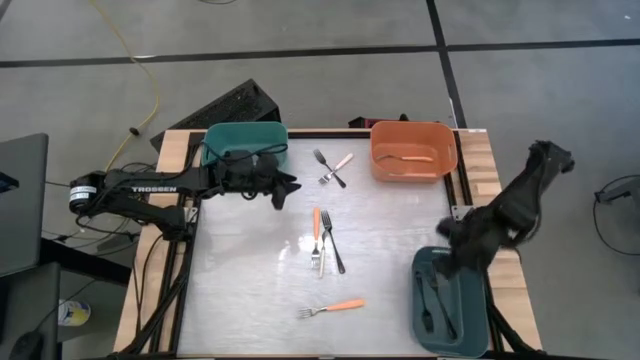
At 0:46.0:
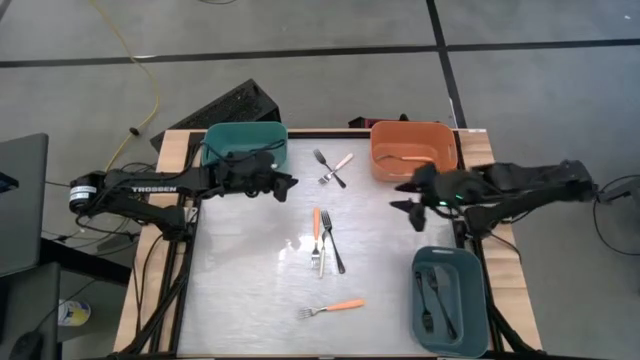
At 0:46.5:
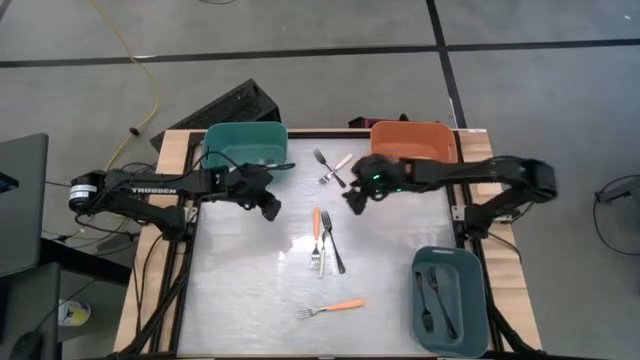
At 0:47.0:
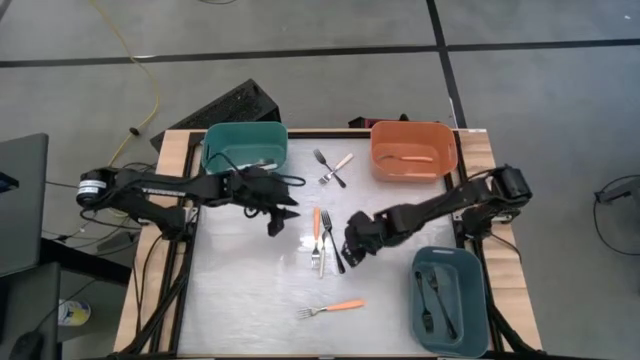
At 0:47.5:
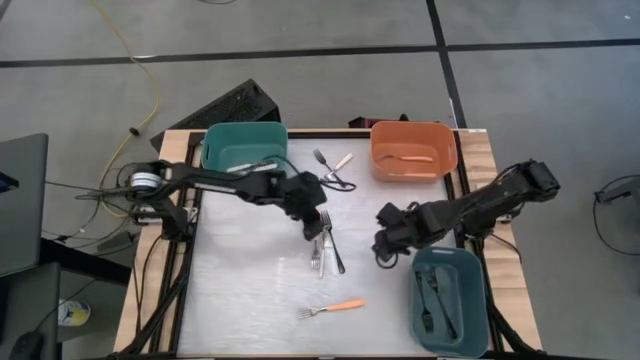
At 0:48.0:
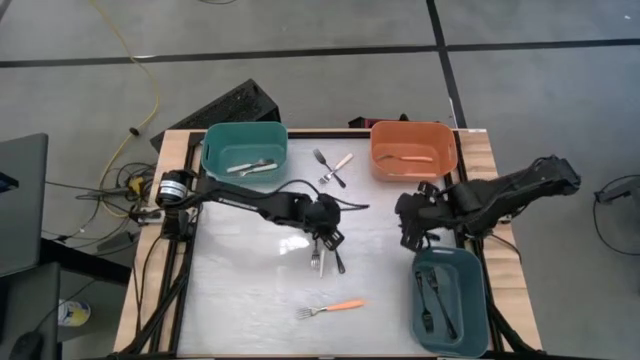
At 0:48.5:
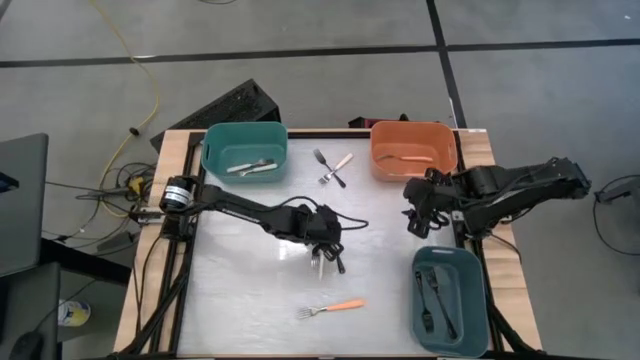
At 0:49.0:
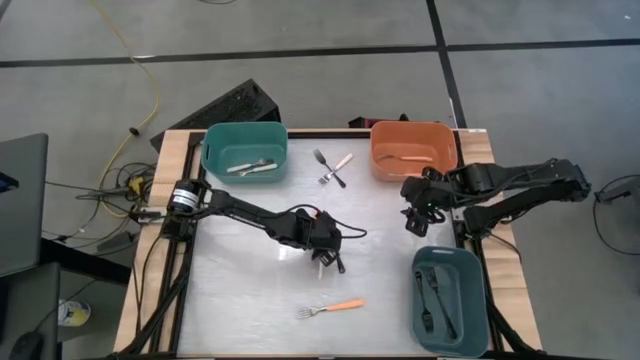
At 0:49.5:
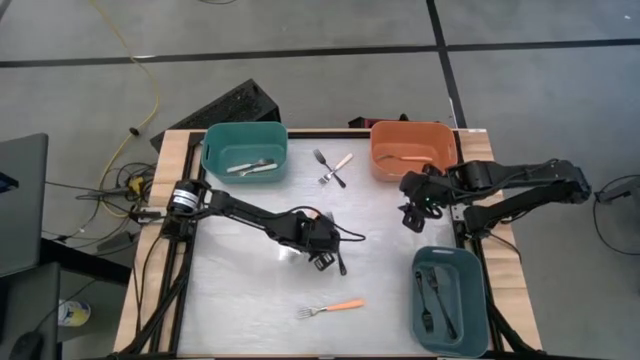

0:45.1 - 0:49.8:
Task: Sort silverware by color (type)
Put the bottom white fork into the green bin

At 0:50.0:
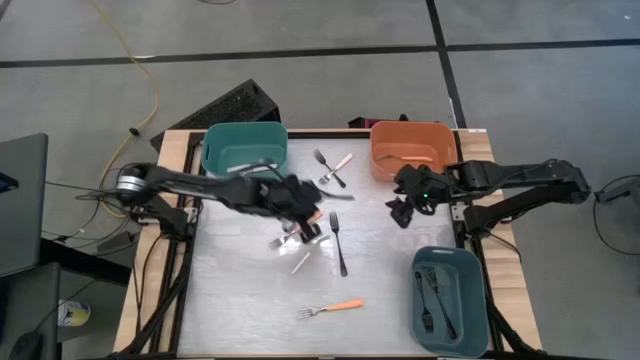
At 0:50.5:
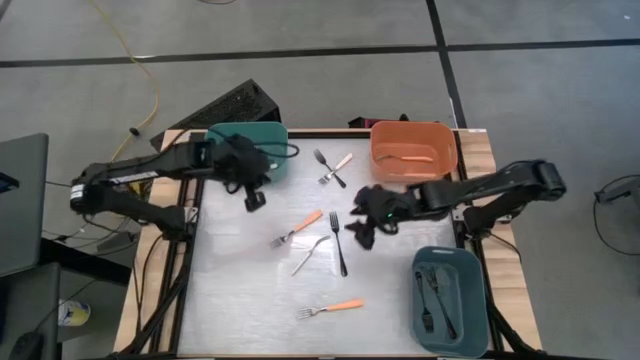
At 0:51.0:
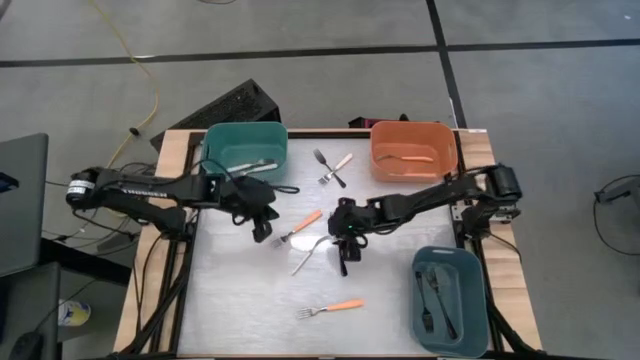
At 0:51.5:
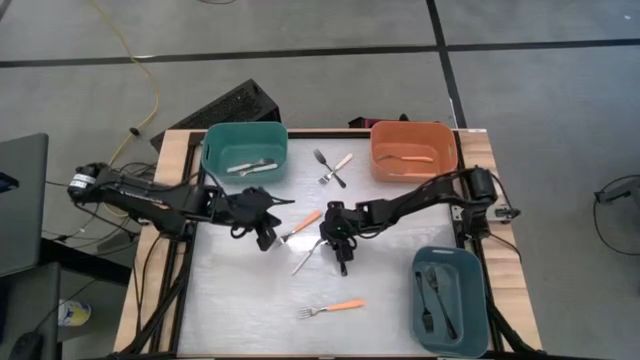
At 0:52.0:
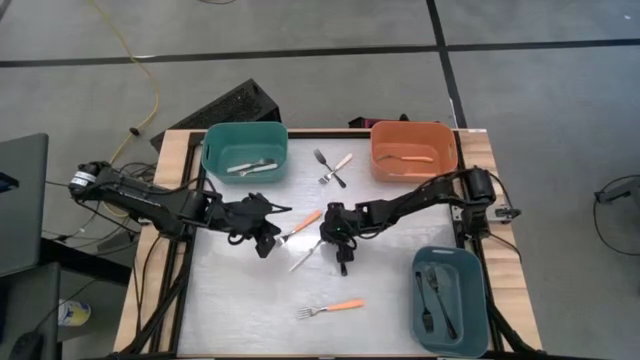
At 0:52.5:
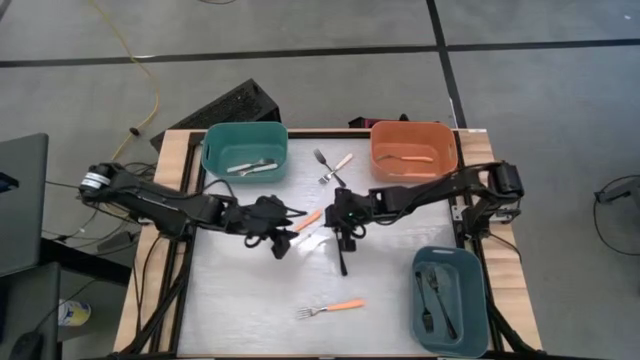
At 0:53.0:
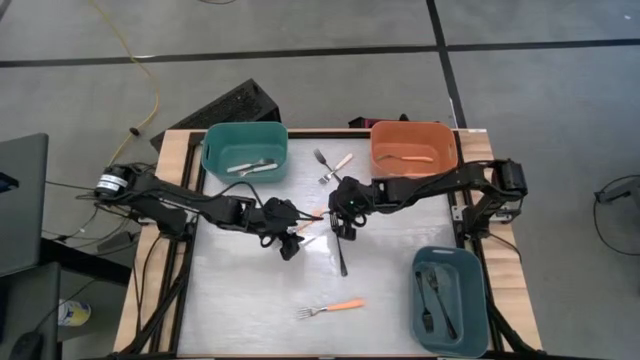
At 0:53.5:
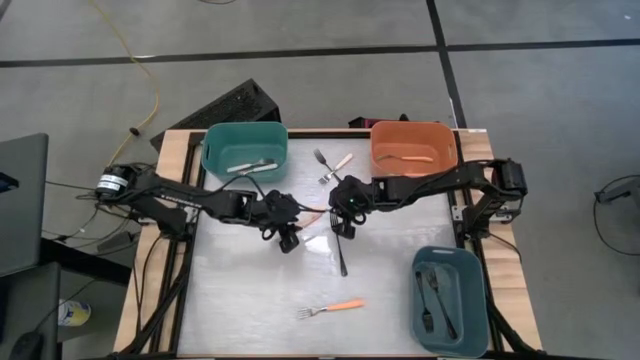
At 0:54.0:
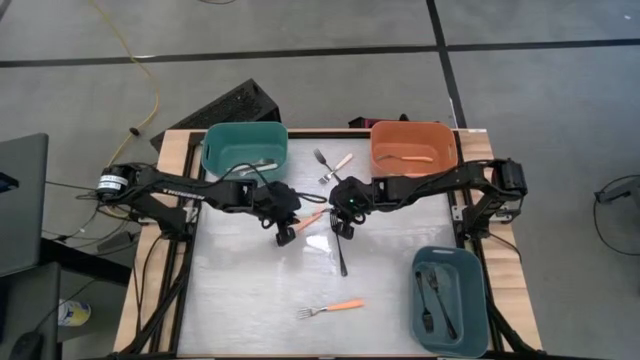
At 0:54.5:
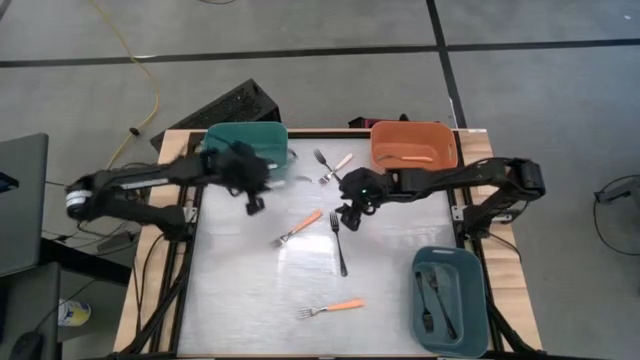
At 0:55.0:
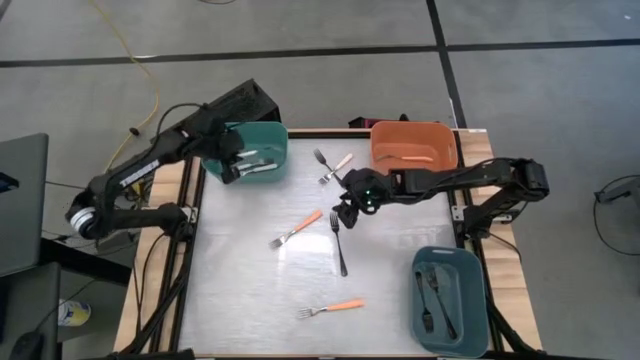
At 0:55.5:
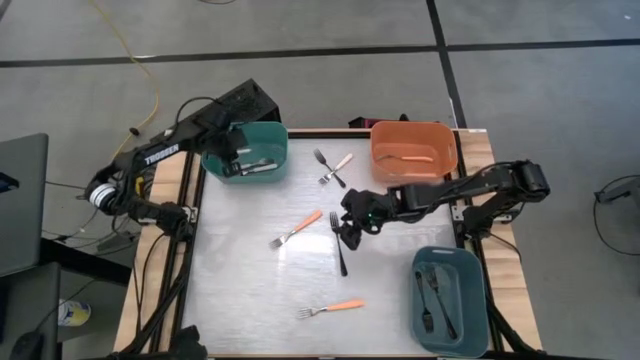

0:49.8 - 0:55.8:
Put the bottom white fork into the green bin

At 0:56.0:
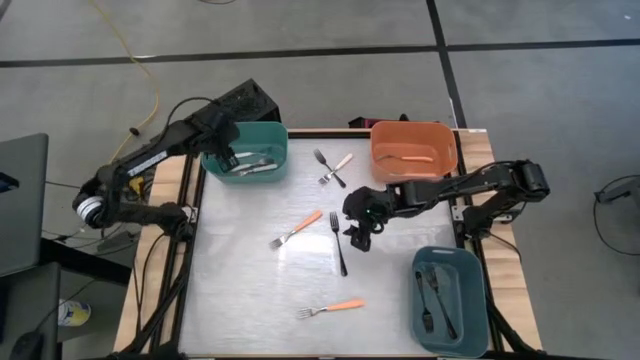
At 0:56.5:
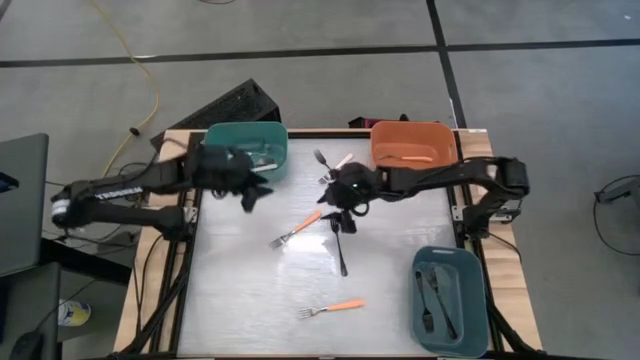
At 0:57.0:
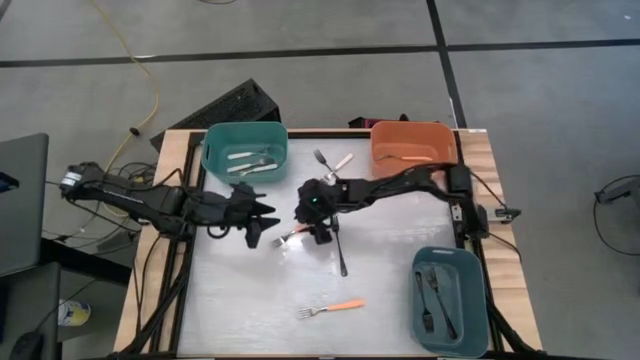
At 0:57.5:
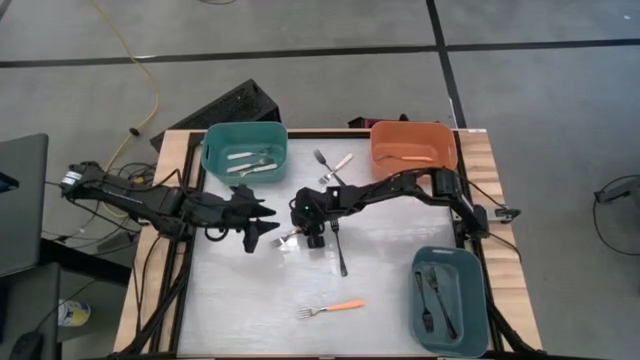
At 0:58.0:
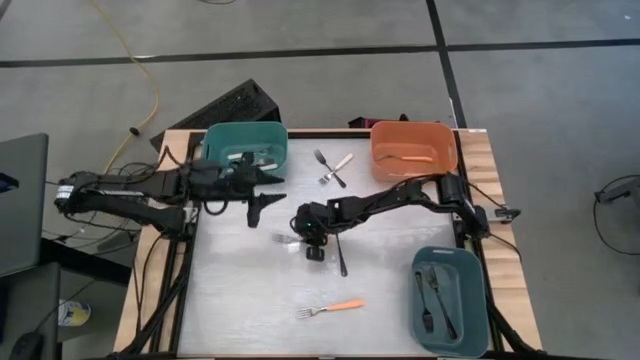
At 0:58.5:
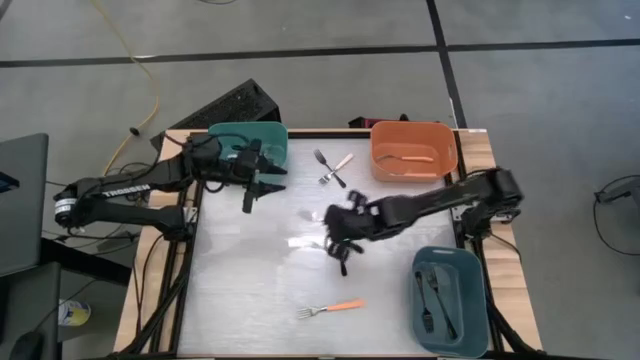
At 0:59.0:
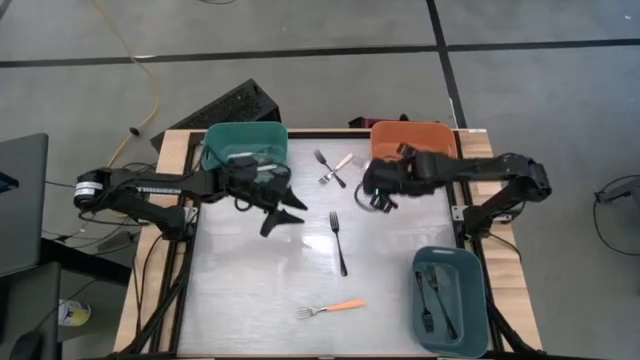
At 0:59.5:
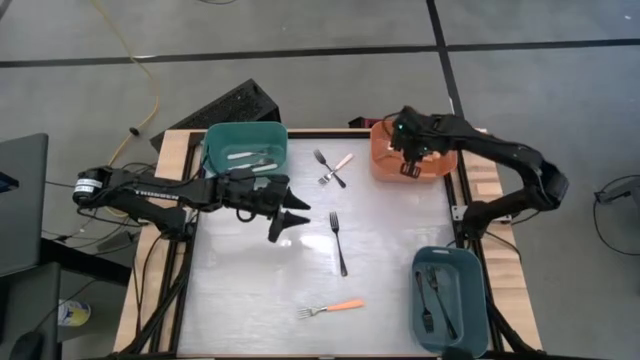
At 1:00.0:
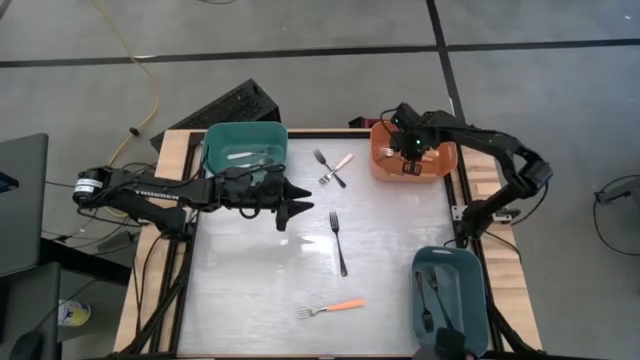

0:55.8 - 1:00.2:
Put the top orange fork into the orange bin

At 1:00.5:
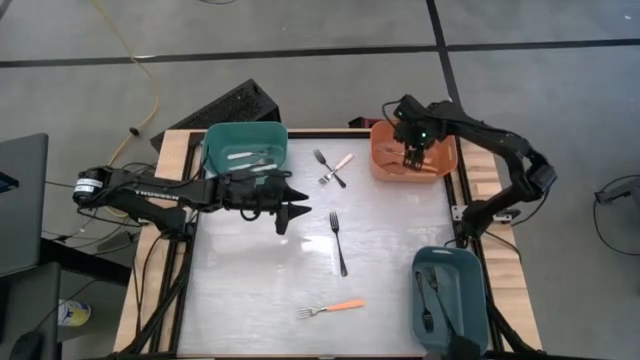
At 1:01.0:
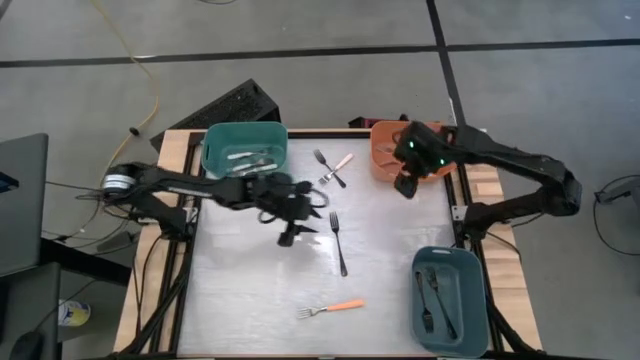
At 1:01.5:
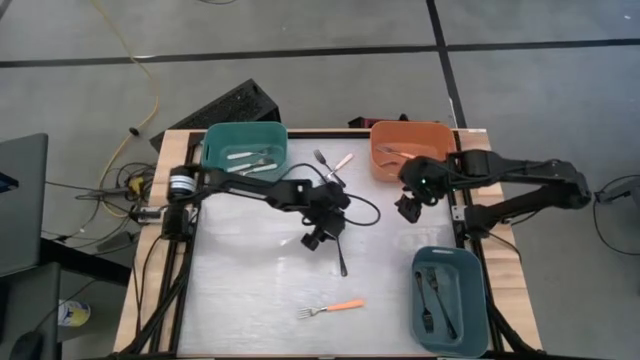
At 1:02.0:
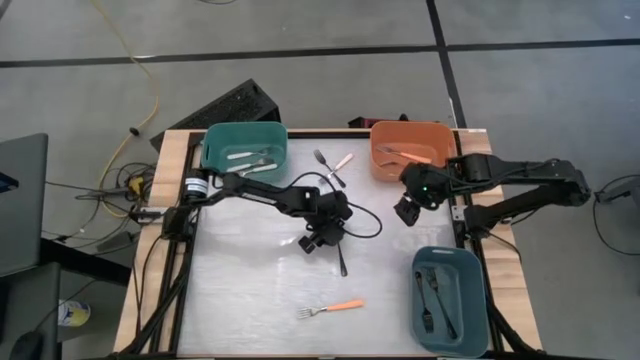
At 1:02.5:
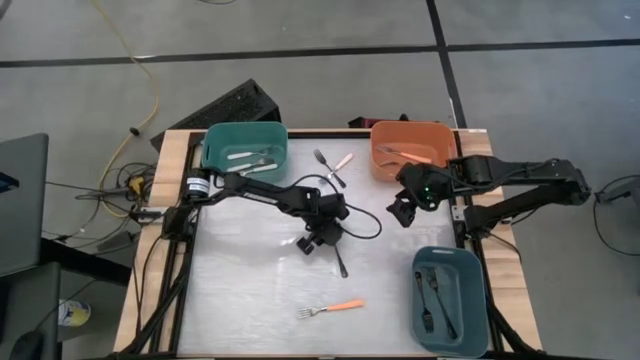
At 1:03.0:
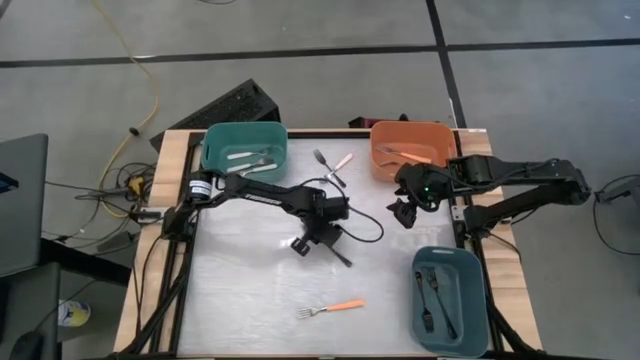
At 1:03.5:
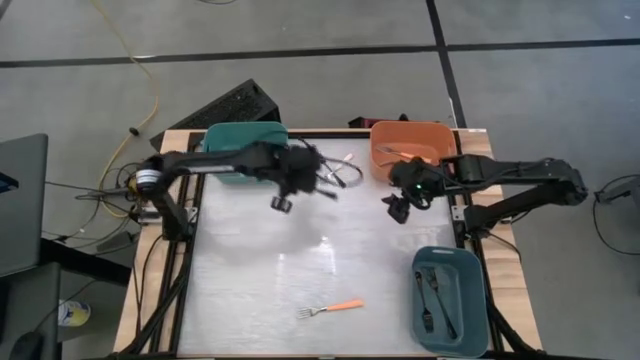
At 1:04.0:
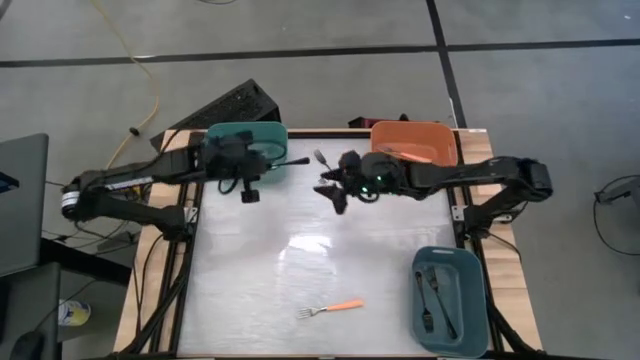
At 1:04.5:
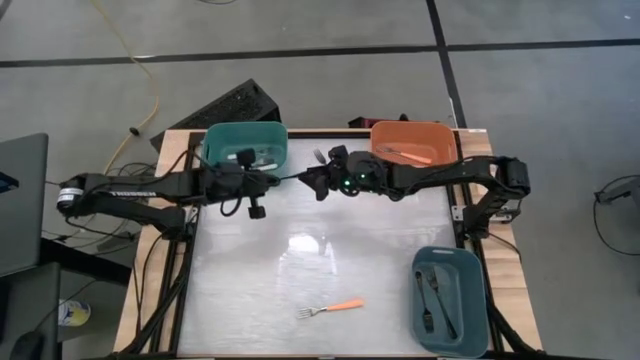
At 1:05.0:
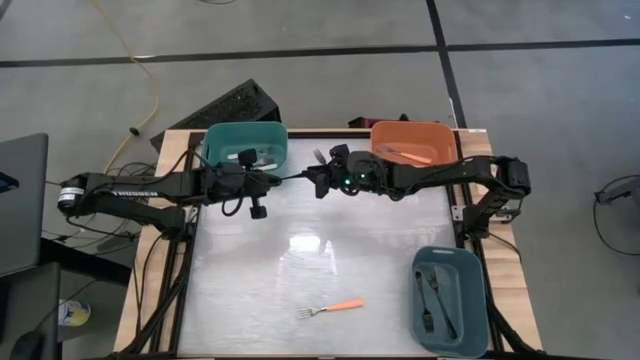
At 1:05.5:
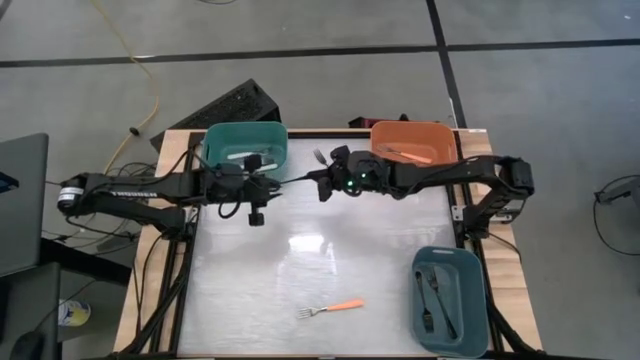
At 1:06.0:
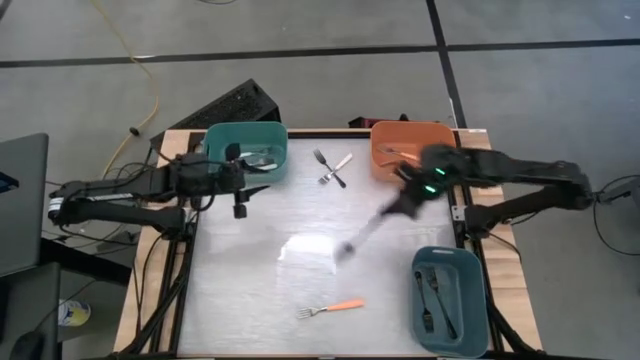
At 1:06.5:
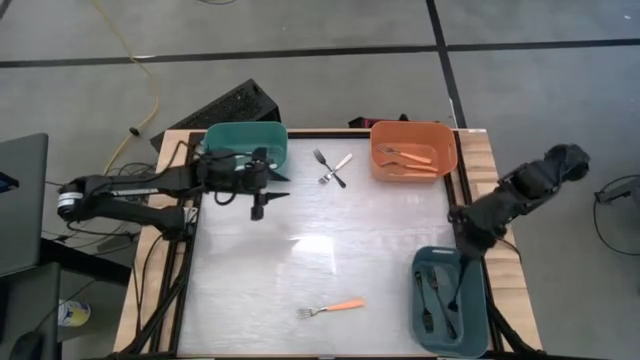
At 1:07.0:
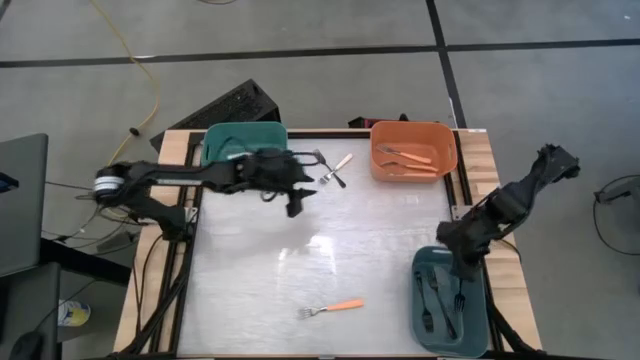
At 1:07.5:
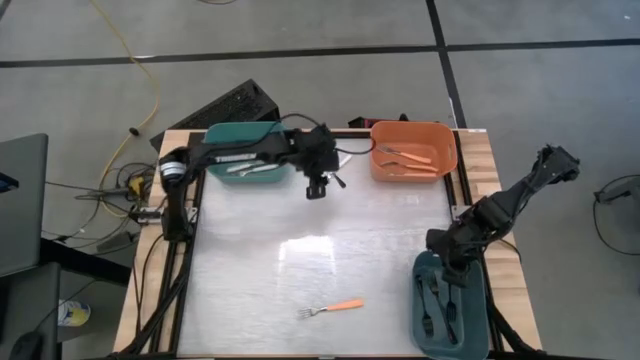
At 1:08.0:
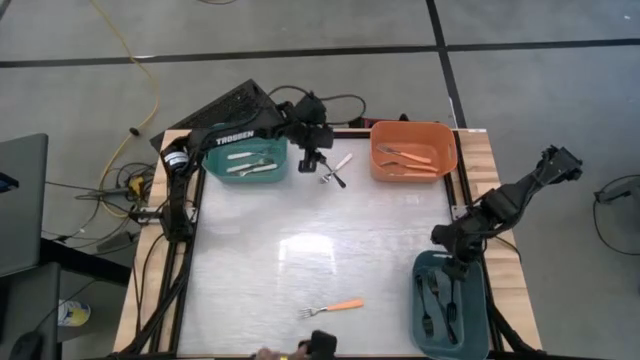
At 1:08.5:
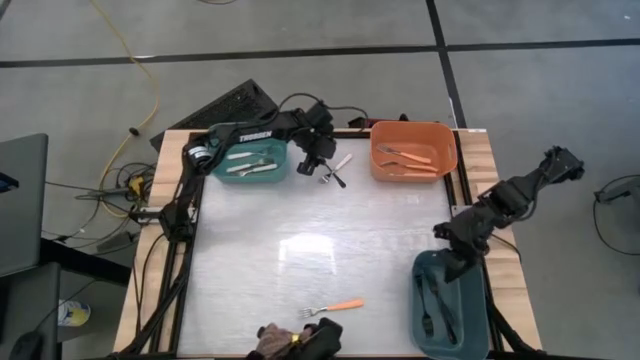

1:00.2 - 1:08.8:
Put the bottom black fork into the gray bin
